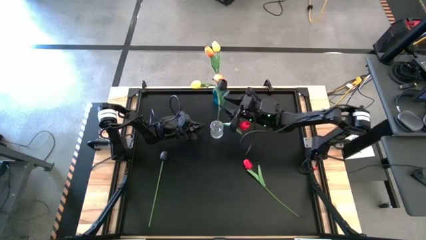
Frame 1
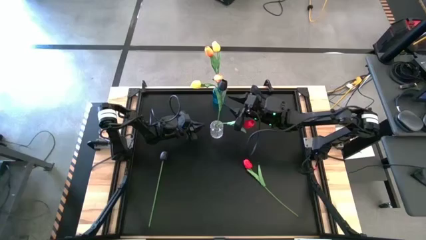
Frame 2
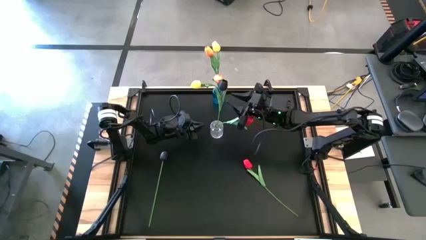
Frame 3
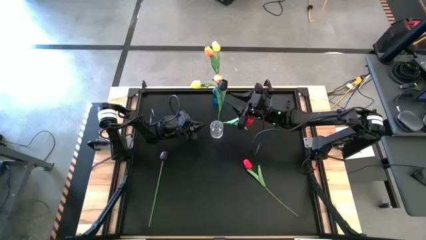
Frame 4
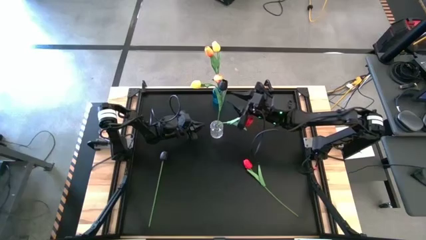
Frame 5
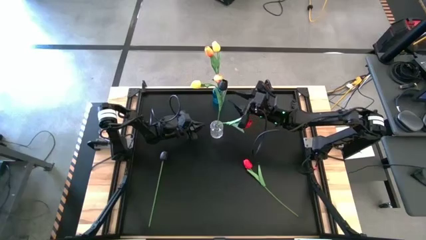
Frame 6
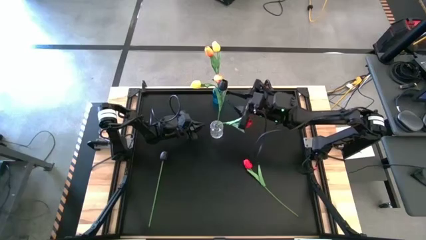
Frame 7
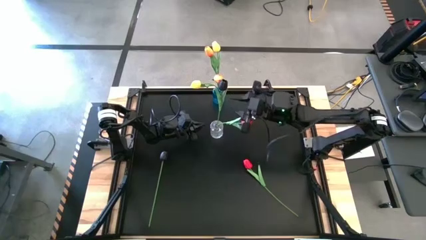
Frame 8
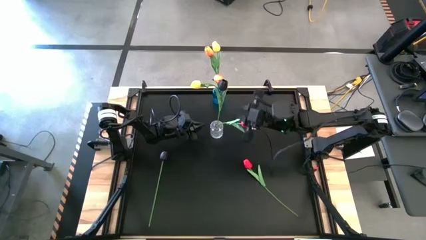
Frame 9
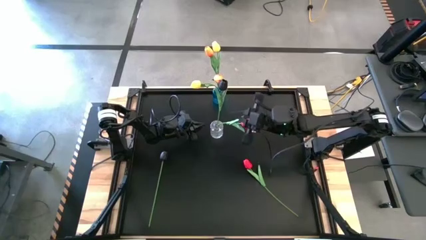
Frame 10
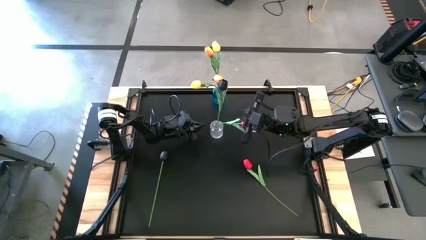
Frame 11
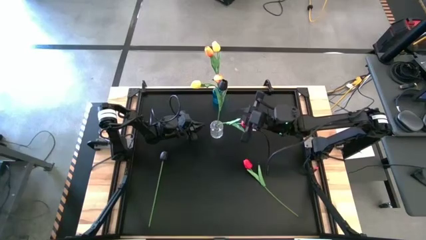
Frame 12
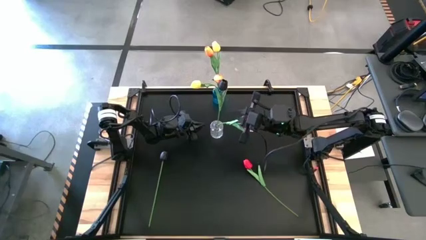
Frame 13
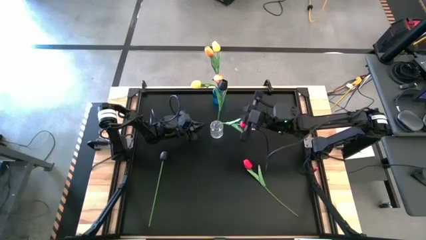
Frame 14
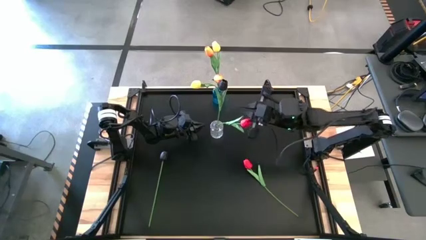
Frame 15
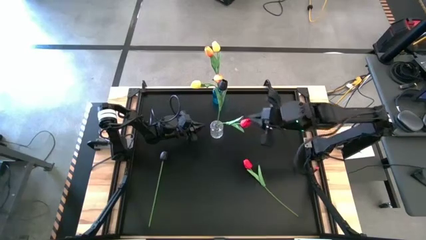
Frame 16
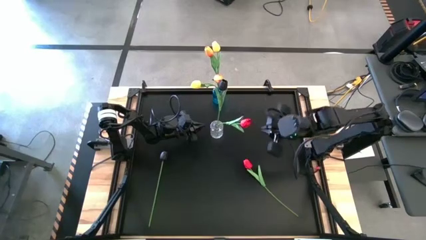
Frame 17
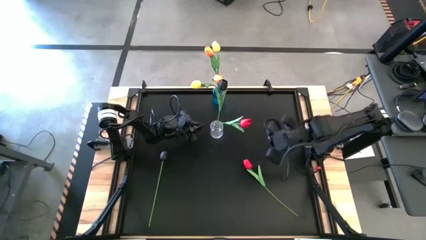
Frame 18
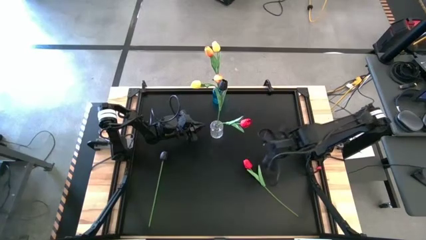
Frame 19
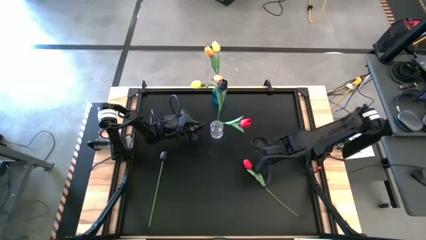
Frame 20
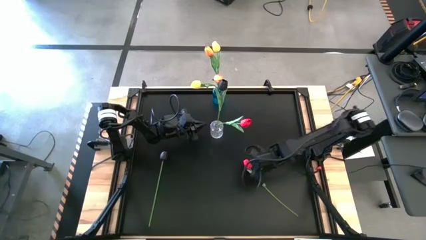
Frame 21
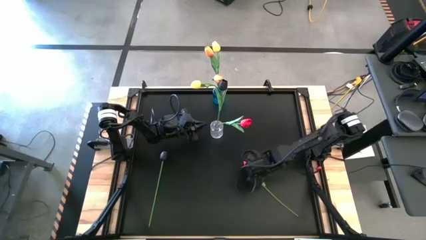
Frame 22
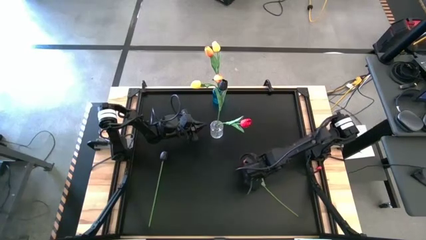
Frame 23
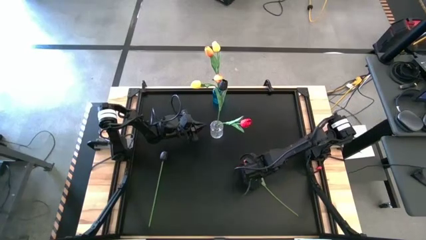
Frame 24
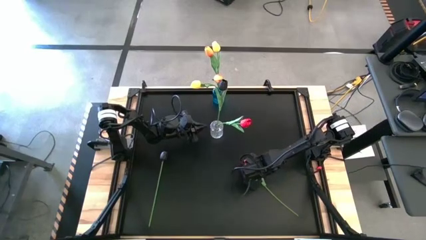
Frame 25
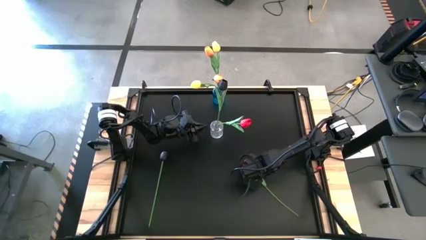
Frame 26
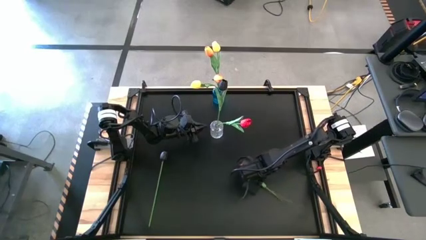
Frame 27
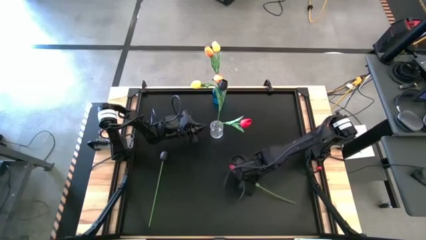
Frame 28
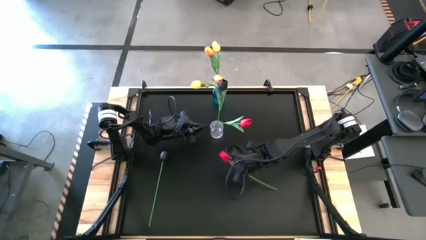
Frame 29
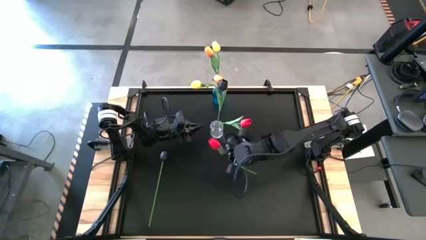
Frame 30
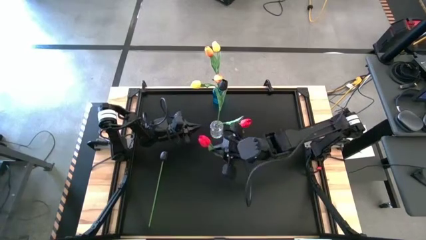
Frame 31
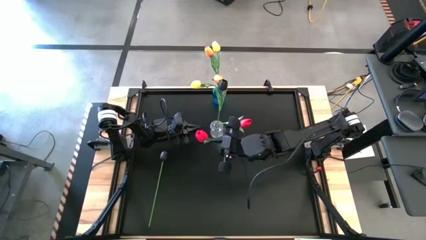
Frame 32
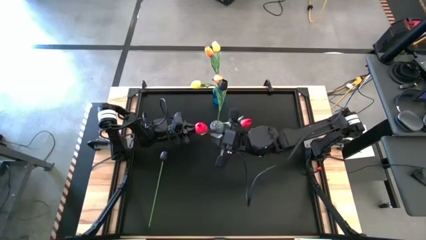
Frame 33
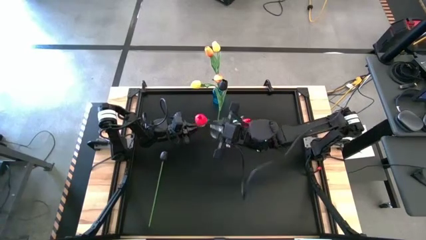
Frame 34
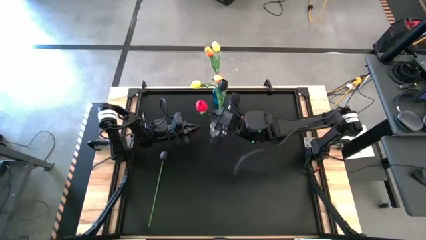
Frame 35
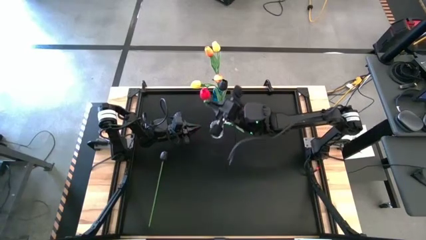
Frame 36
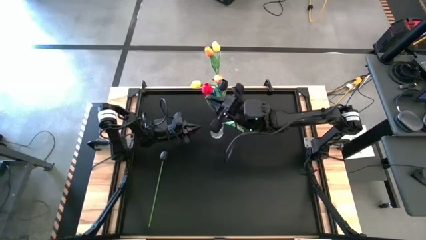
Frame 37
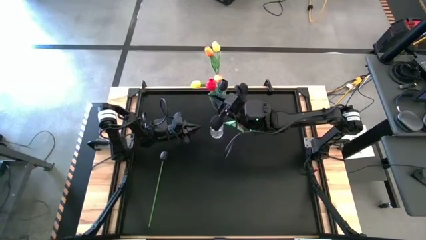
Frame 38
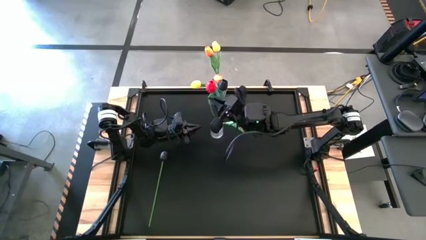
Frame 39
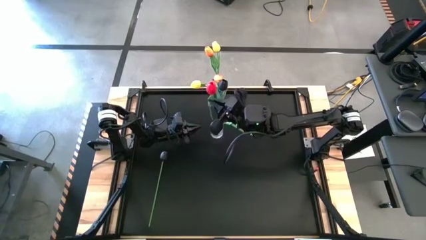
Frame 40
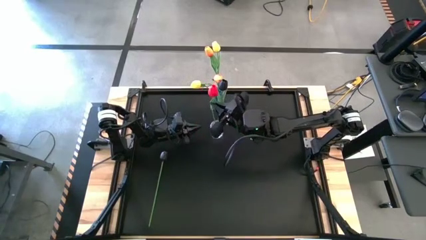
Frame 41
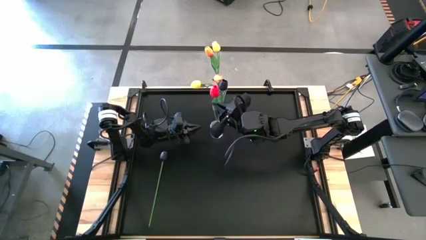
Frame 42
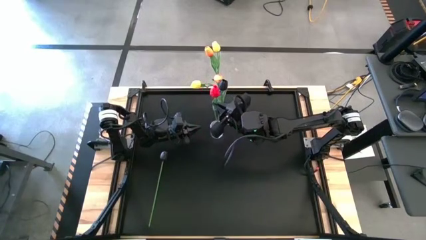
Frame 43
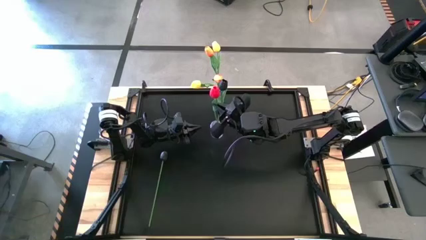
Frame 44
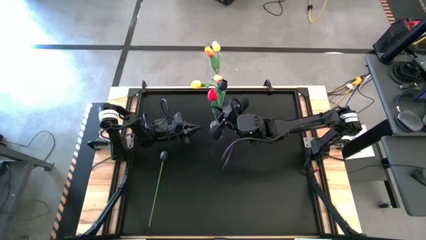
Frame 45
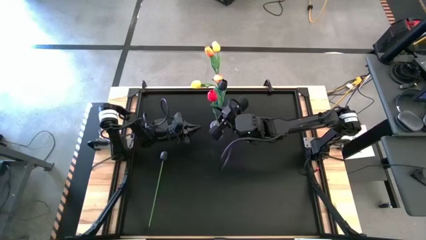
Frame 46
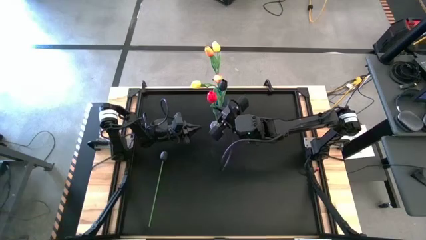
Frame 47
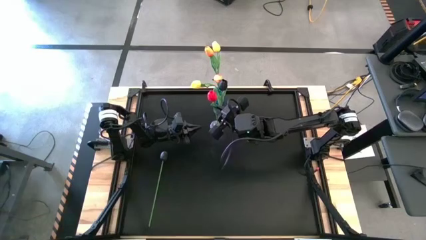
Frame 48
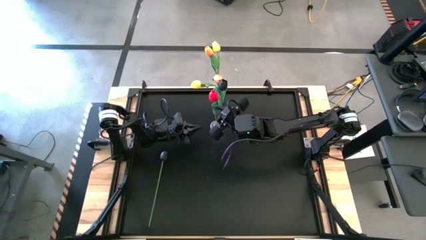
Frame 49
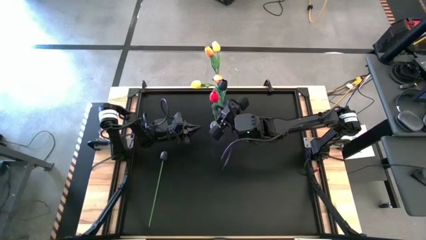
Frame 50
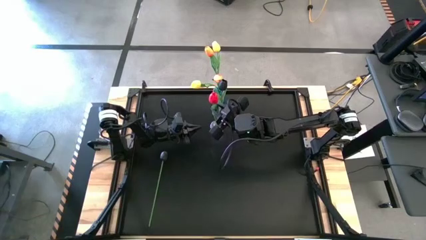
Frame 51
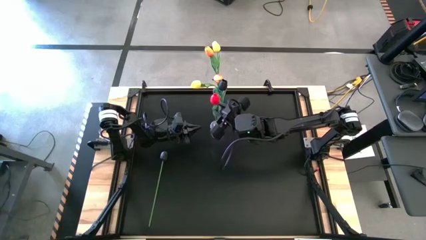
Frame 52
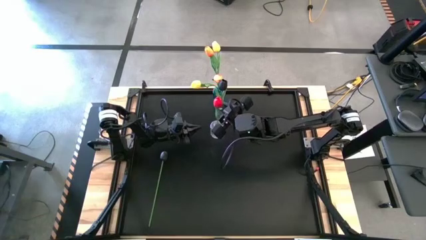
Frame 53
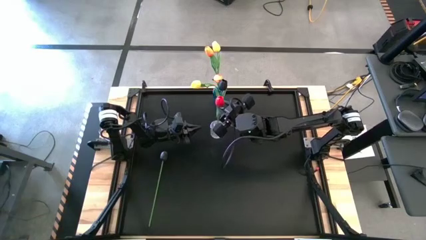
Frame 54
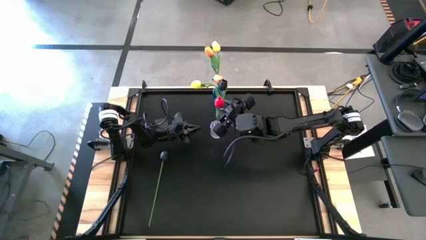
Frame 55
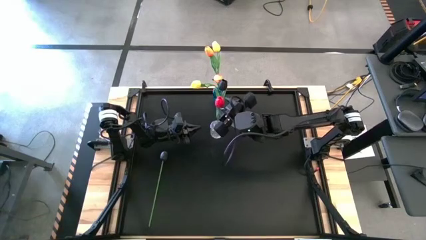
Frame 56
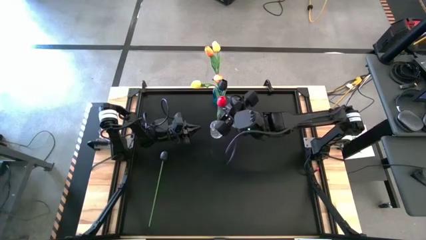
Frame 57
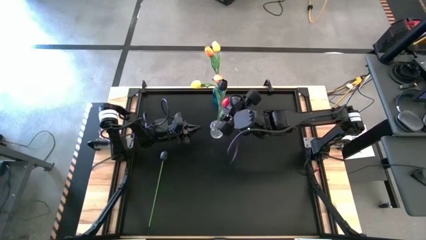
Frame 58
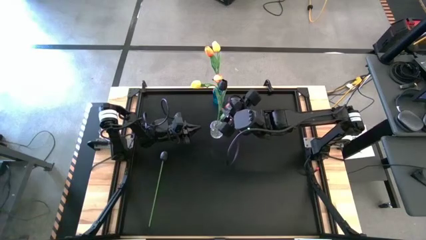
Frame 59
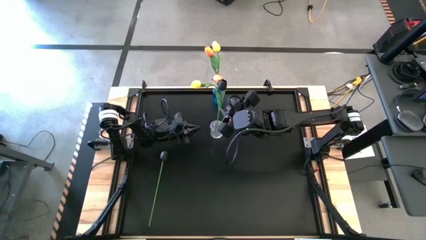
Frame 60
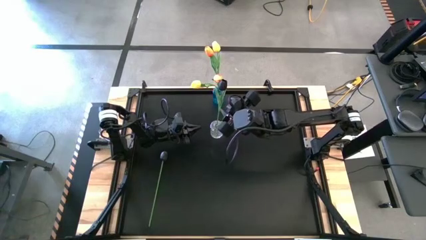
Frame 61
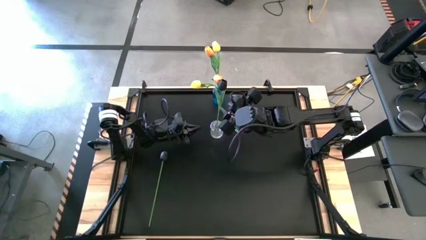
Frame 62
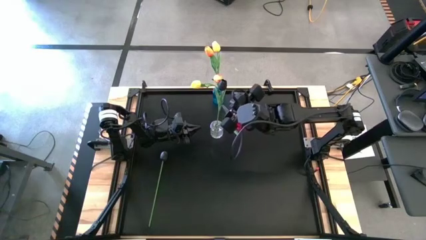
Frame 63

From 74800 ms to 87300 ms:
Task: Sort flowers into vase by color
Put the red tulip into the transparent vase

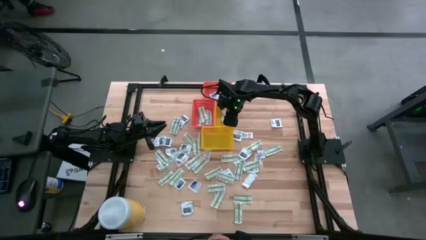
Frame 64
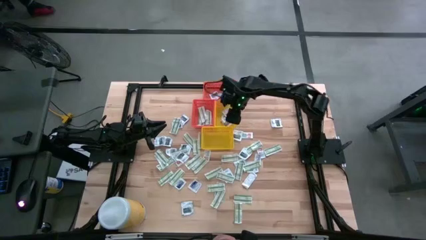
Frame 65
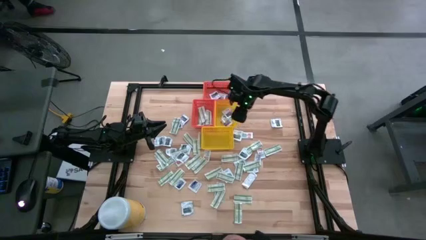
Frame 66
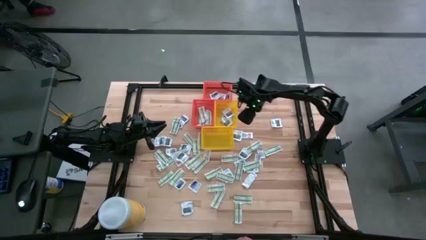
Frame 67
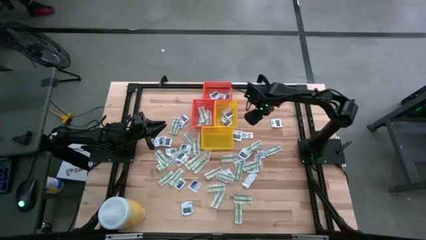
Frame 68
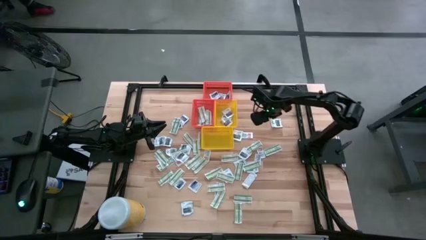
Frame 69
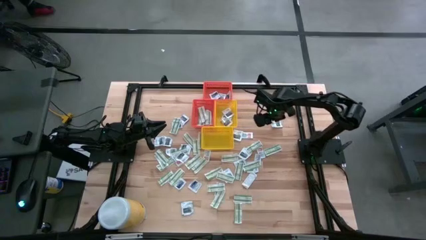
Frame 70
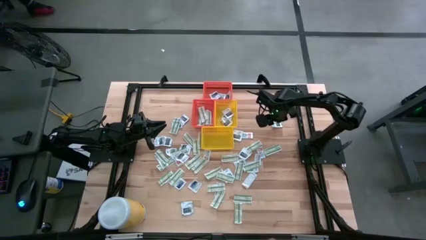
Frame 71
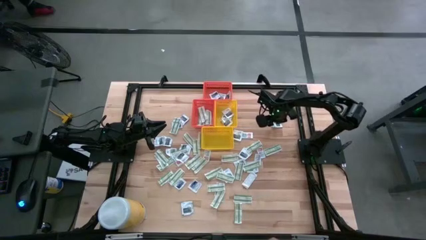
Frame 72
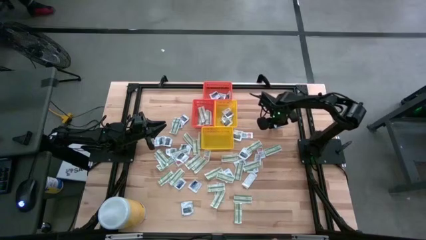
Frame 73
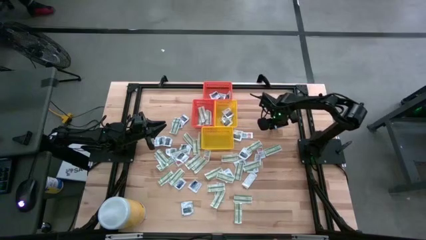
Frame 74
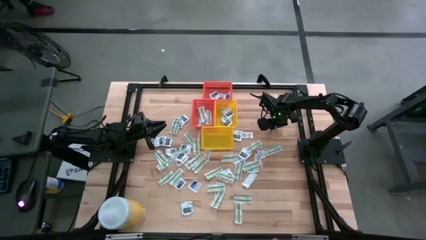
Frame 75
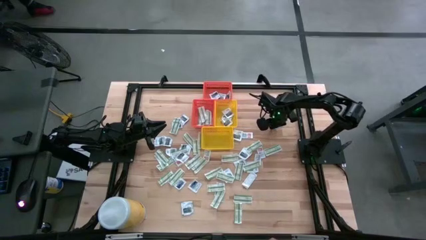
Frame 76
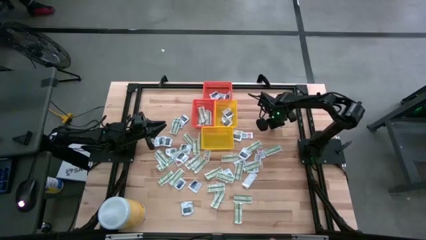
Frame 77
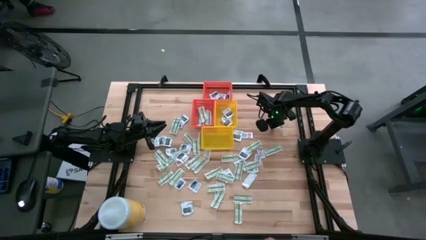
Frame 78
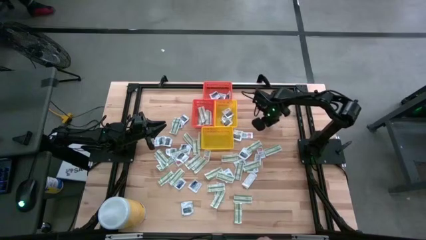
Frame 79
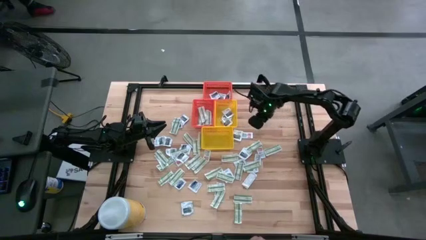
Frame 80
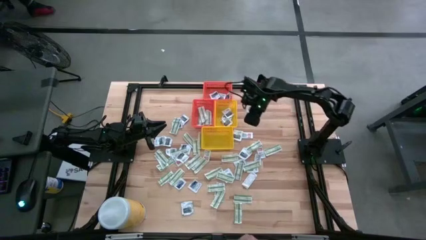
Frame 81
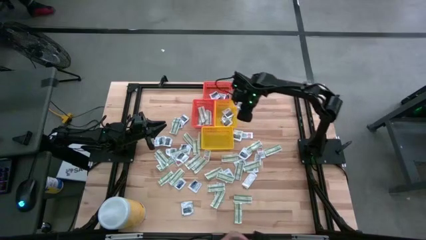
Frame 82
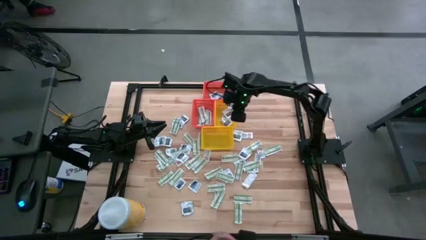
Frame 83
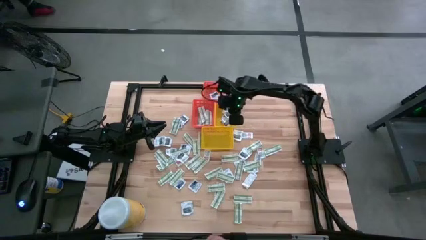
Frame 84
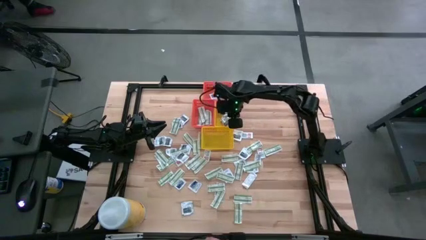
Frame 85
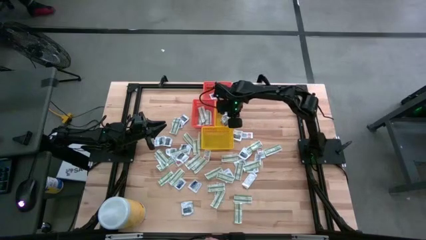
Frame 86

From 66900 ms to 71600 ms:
Task: Pick & Place First Aid Supplies
Put the towelette pack into the top yellow bin
